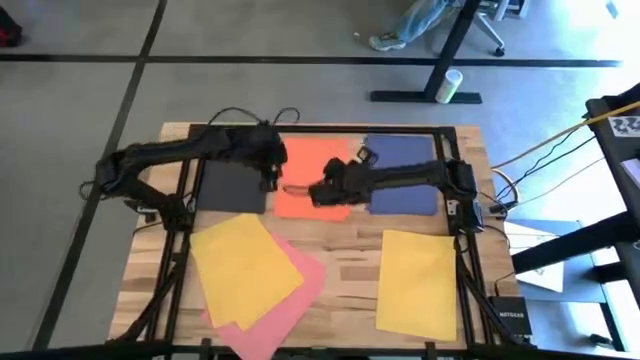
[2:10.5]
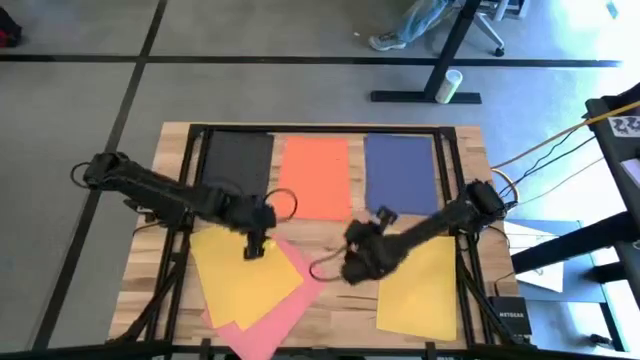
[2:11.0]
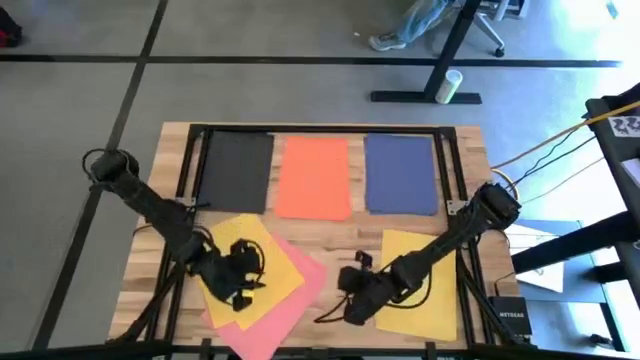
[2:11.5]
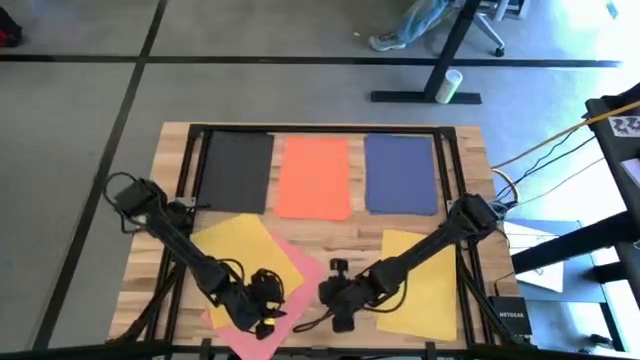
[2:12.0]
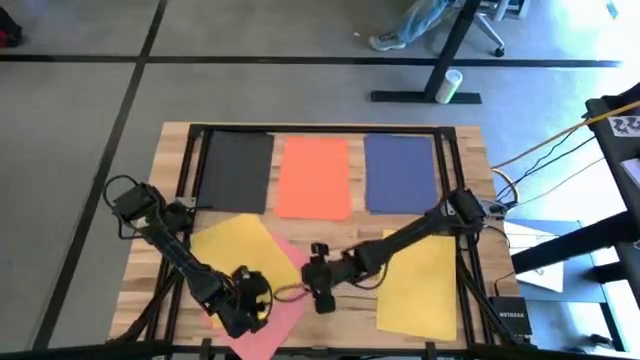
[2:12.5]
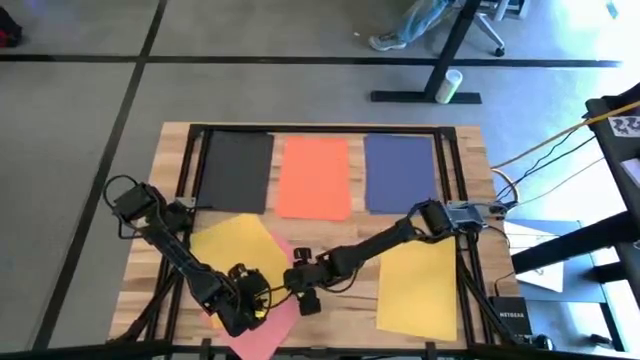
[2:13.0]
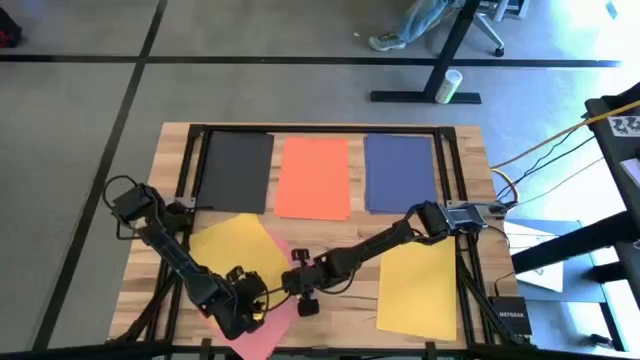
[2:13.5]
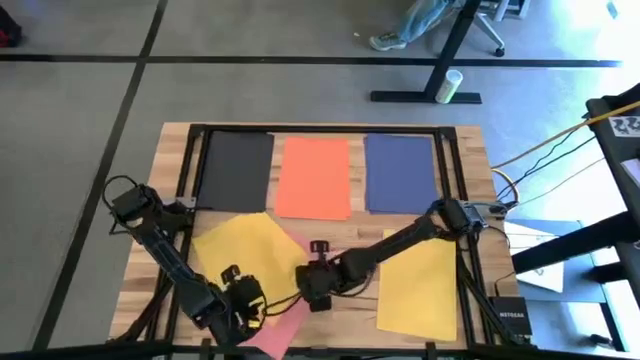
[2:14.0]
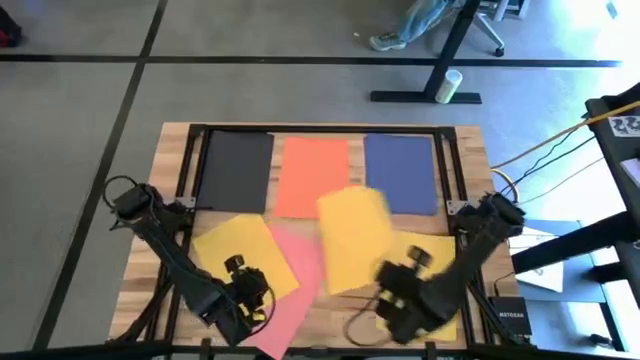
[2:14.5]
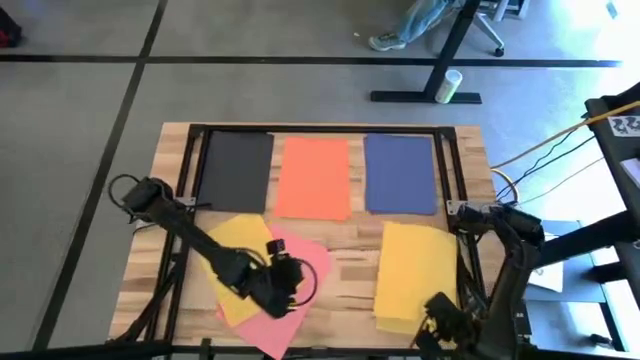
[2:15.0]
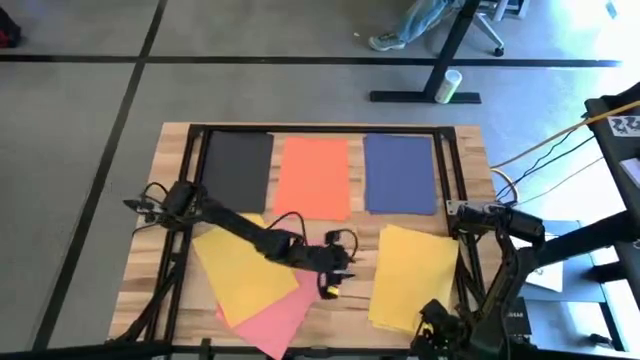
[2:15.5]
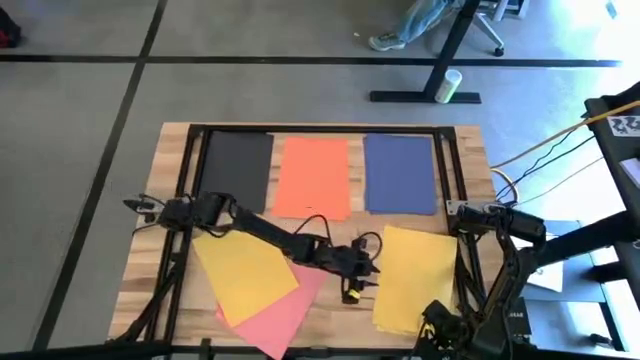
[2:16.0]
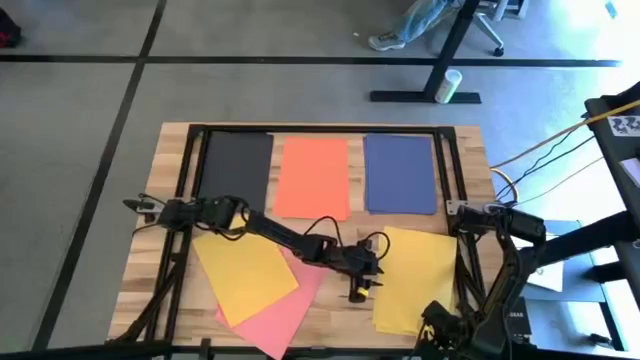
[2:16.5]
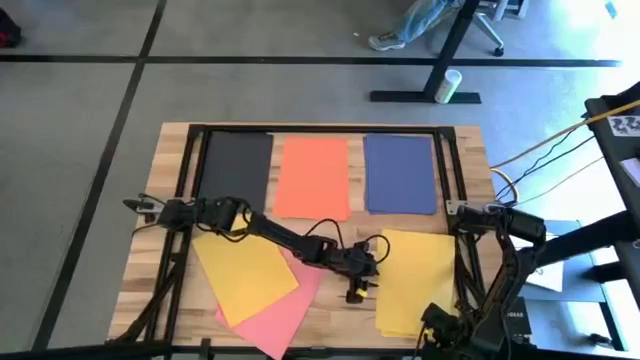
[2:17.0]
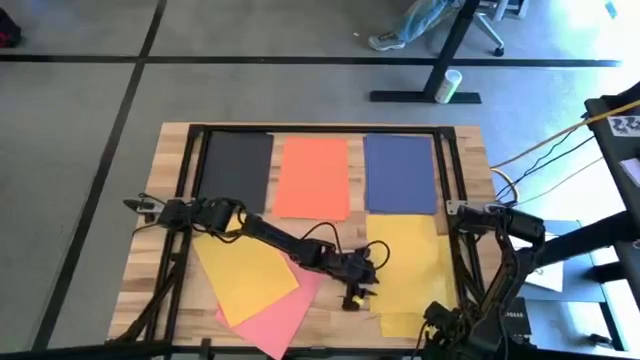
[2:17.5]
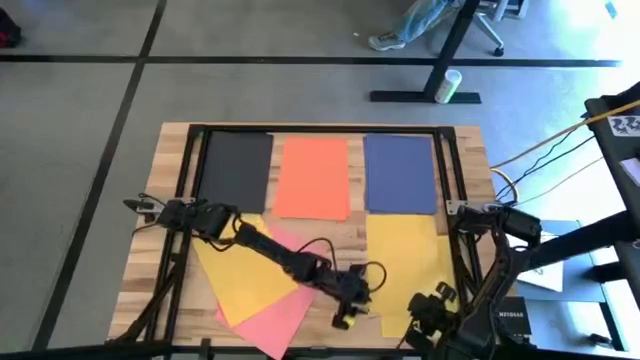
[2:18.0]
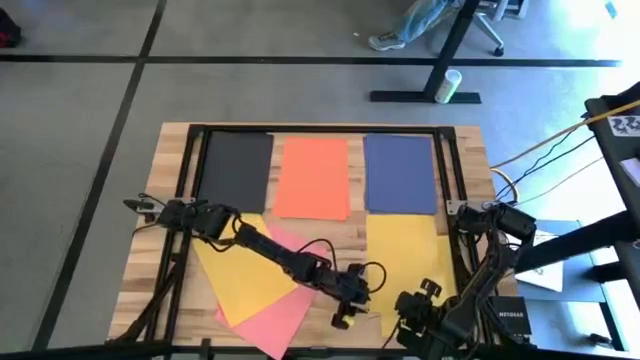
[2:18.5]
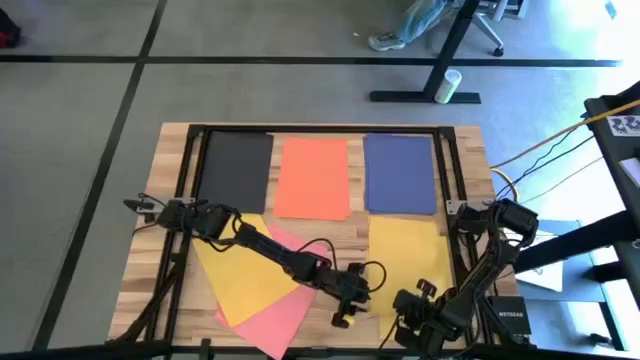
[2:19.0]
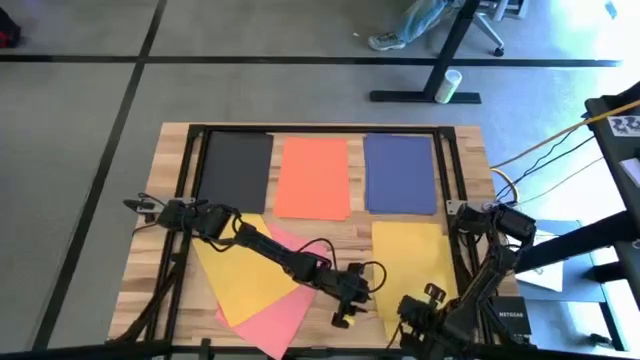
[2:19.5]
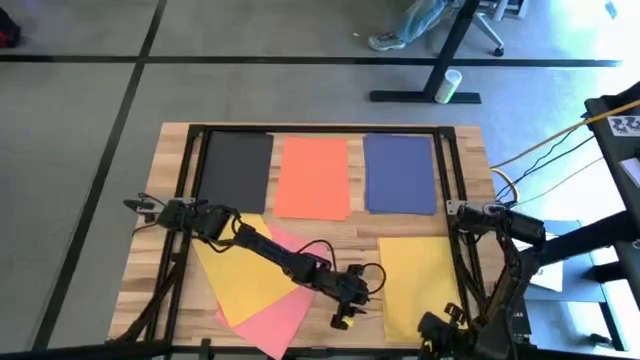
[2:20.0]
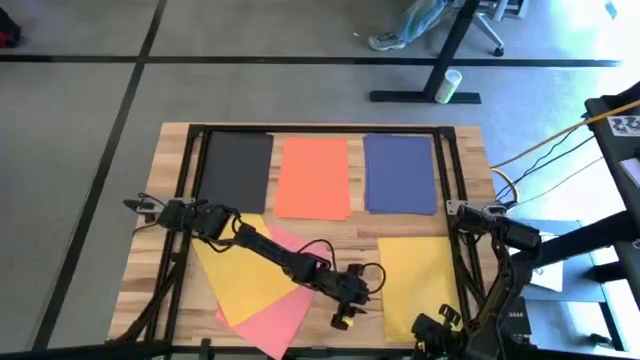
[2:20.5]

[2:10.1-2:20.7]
Task: Organize paper
Stack the yellow on top of the other yellow paper

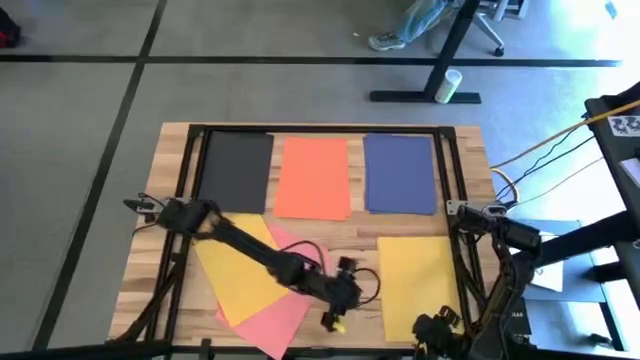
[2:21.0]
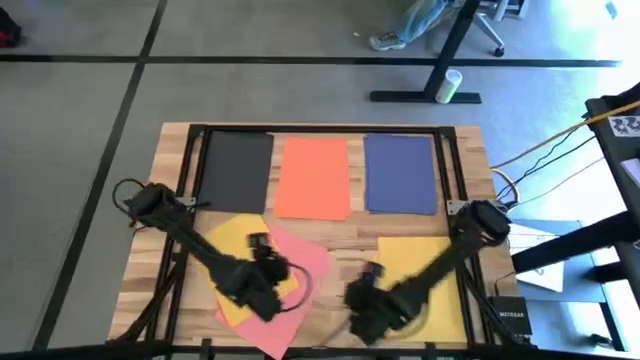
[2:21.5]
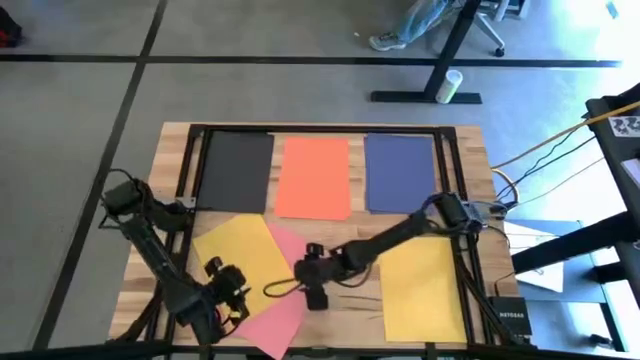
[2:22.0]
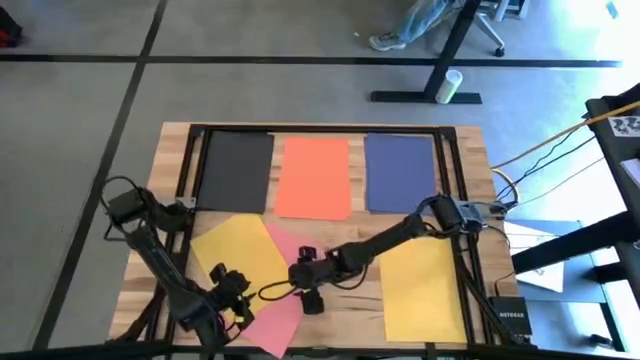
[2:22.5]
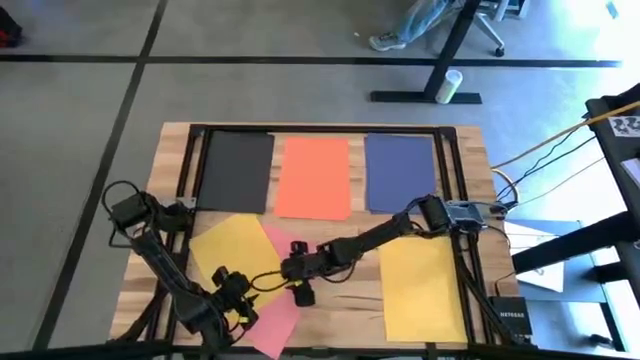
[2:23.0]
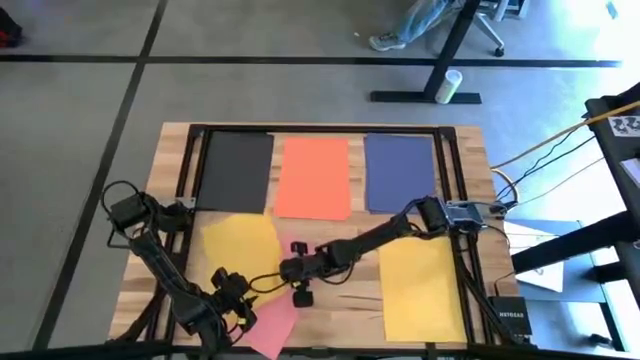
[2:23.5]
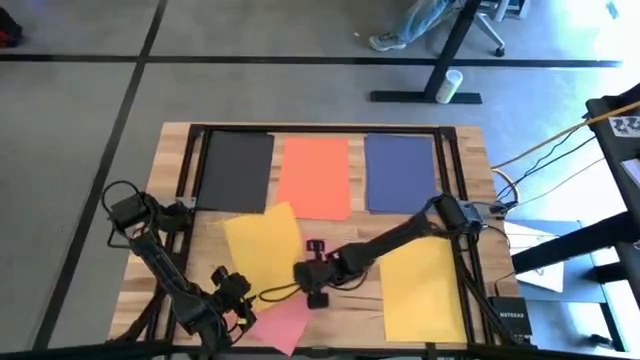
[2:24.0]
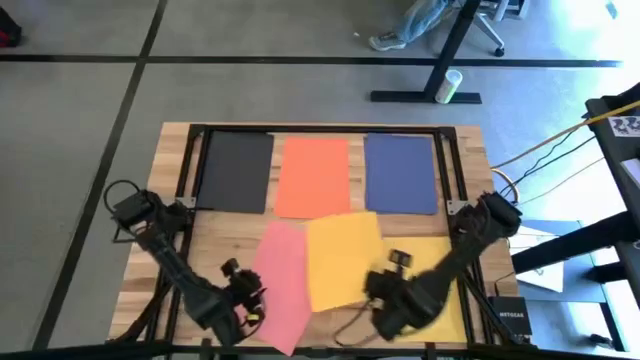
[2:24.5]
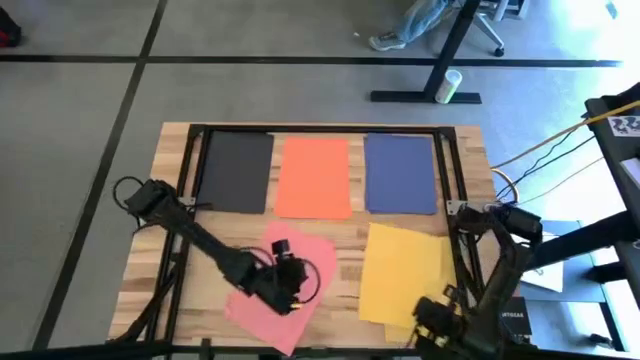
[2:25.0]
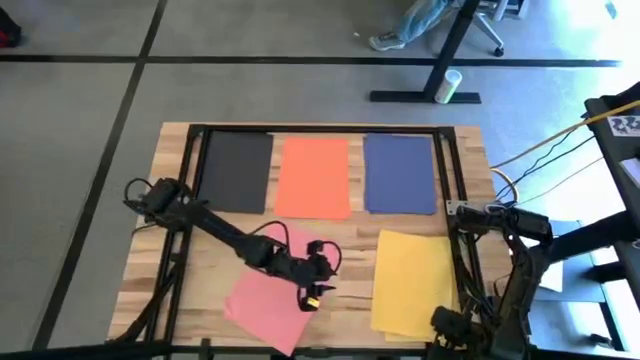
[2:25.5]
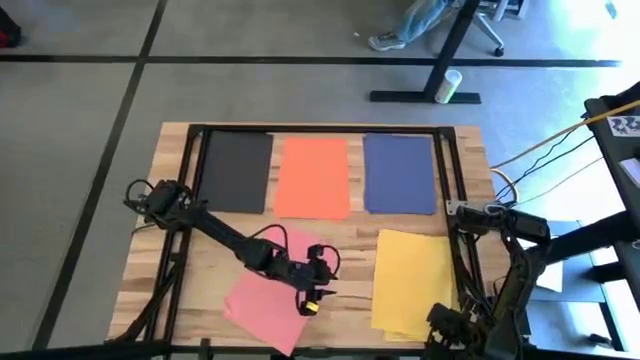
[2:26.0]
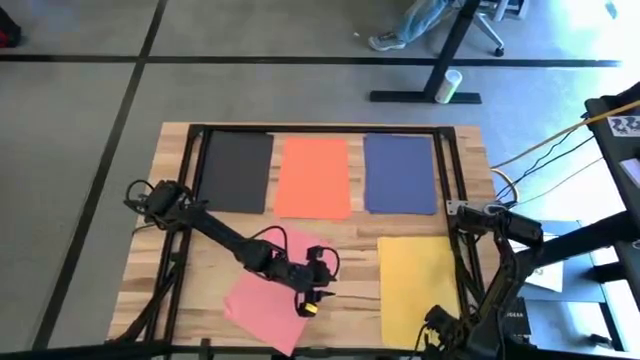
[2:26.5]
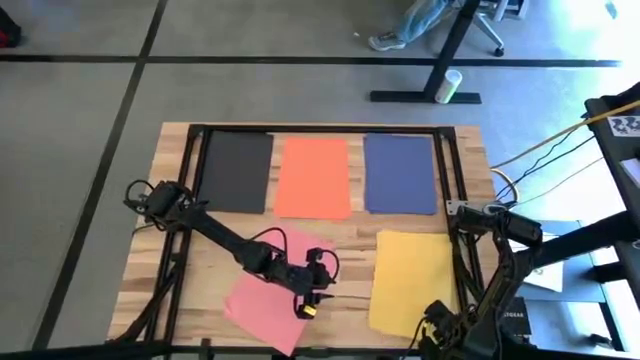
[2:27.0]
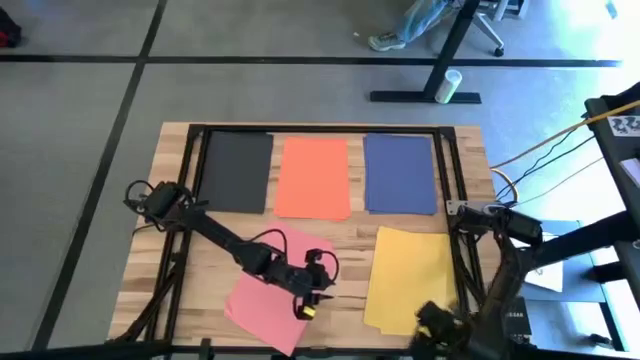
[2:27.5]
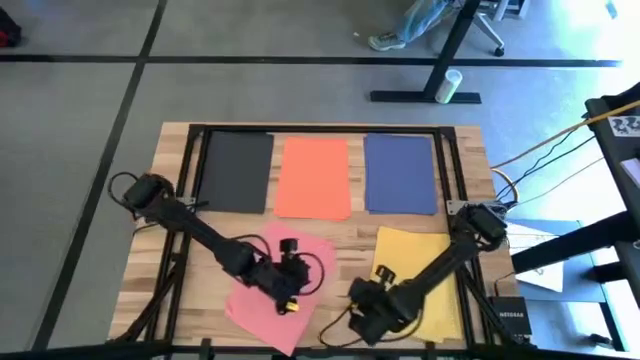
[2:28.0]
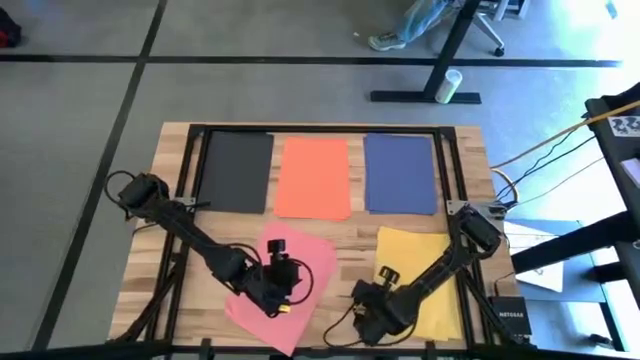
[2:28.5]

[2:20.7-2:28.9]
Stack the yellow paper on top of the other yellow paper

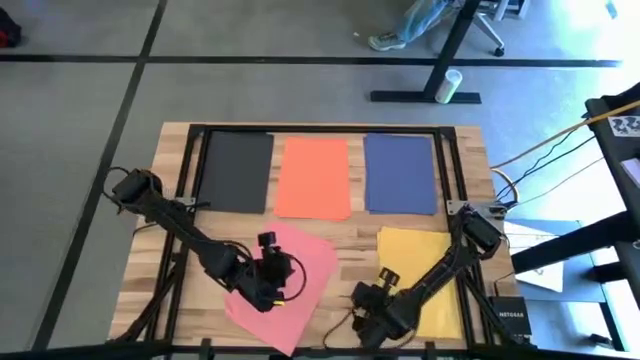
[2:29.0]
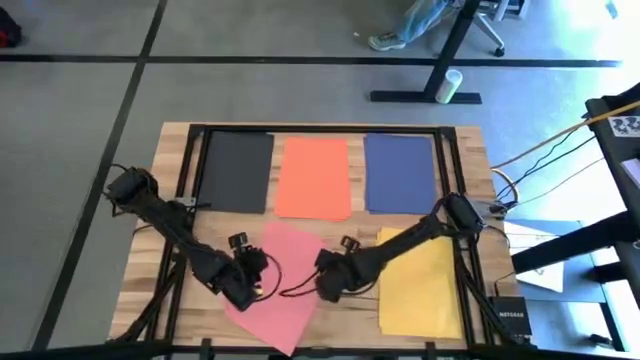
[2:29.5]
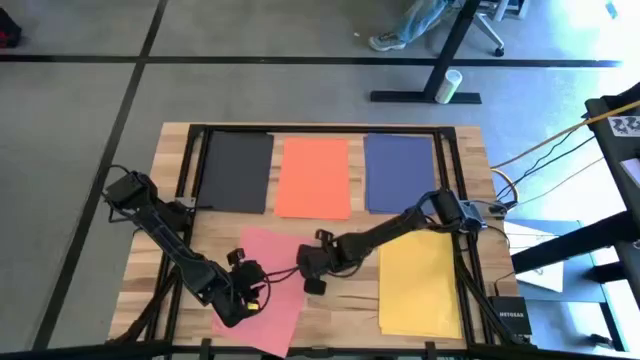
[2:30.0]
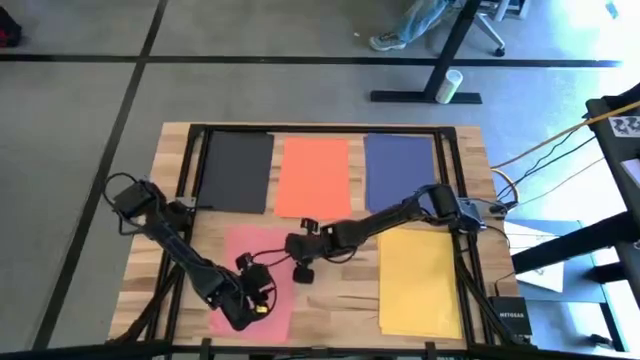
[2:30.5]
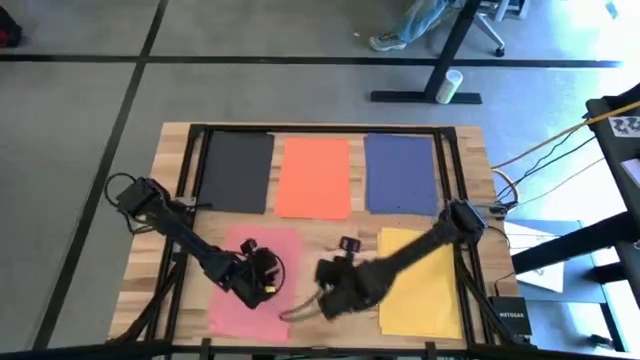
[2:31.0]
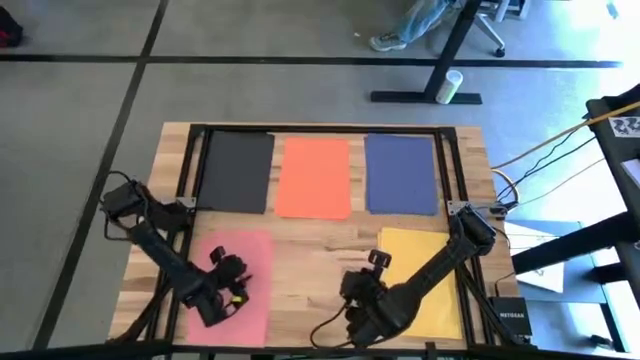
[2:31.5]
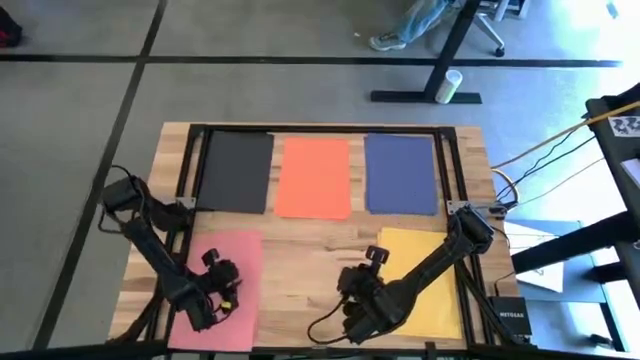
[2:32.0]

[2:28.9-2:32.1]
Move the stacked pink papers to the bottom left of the table
